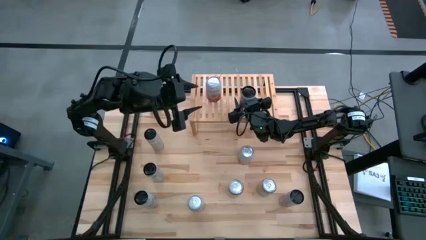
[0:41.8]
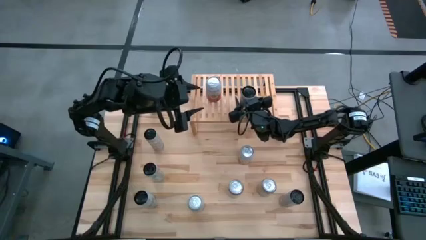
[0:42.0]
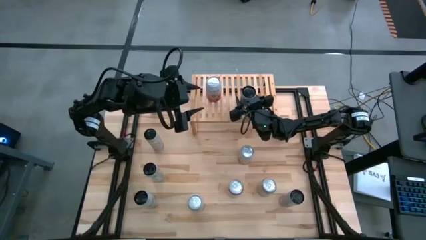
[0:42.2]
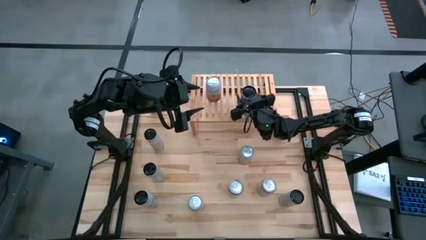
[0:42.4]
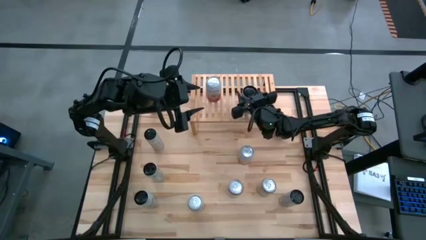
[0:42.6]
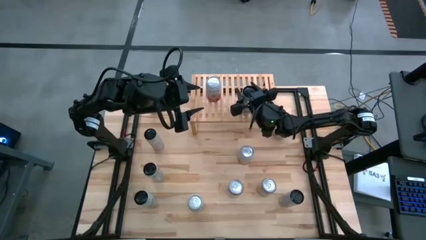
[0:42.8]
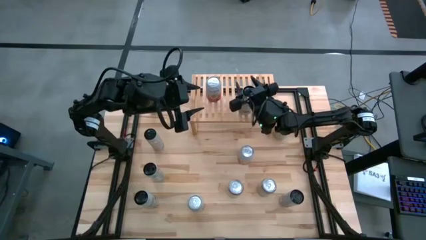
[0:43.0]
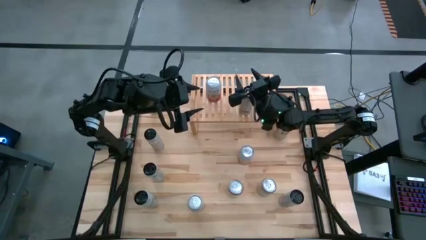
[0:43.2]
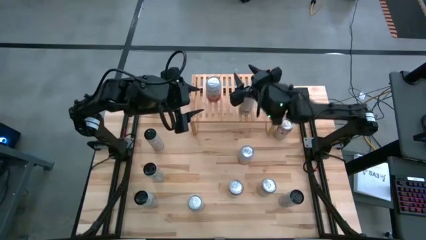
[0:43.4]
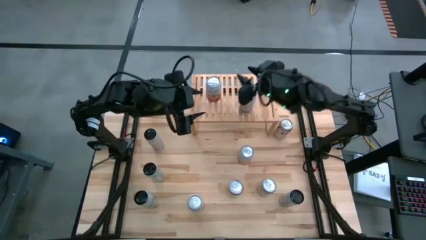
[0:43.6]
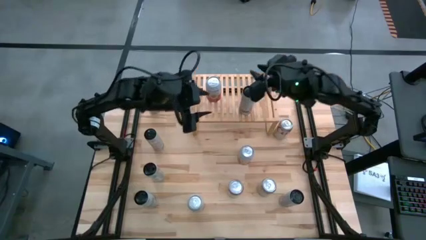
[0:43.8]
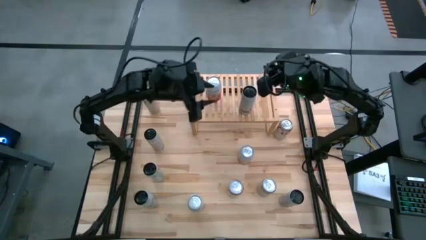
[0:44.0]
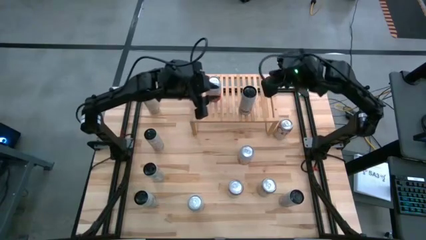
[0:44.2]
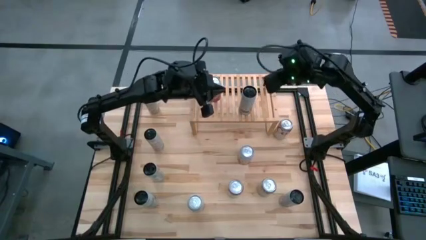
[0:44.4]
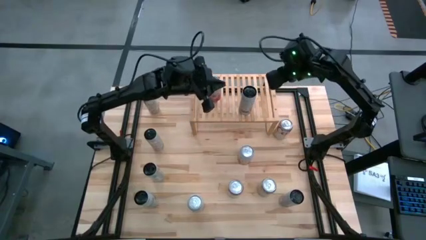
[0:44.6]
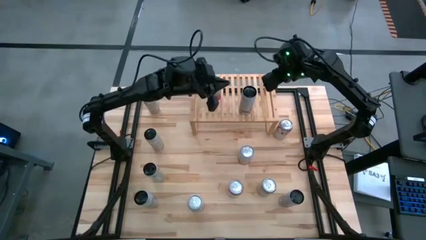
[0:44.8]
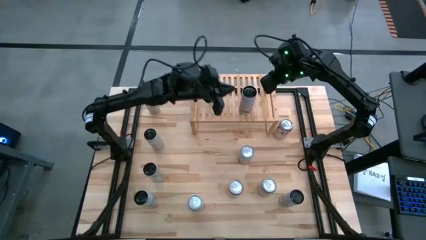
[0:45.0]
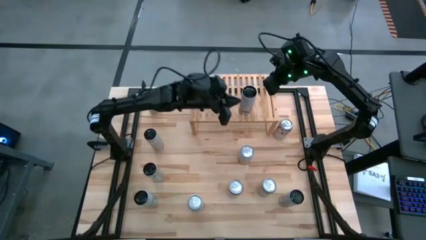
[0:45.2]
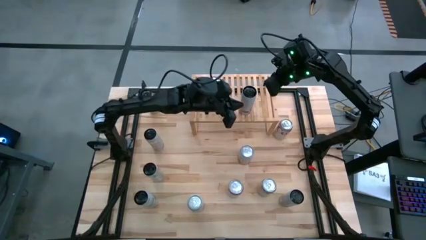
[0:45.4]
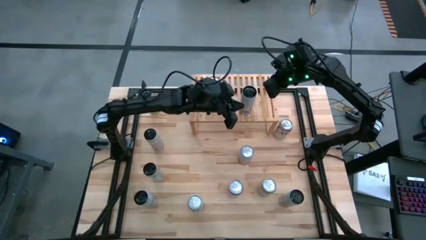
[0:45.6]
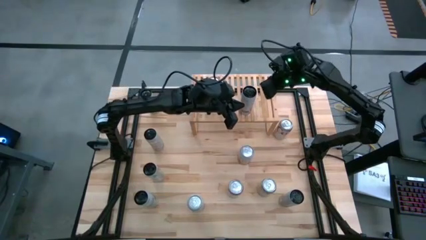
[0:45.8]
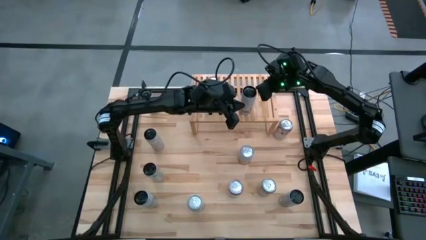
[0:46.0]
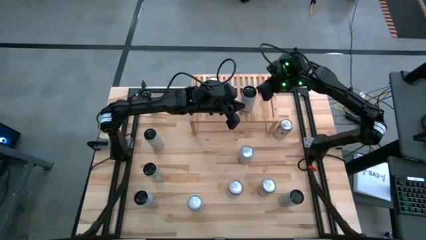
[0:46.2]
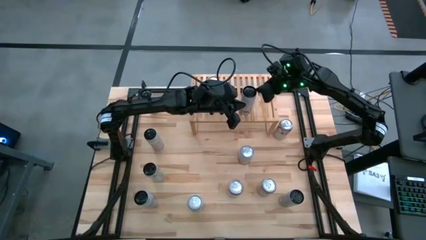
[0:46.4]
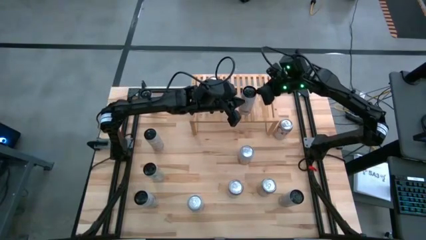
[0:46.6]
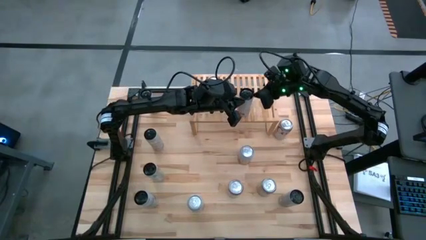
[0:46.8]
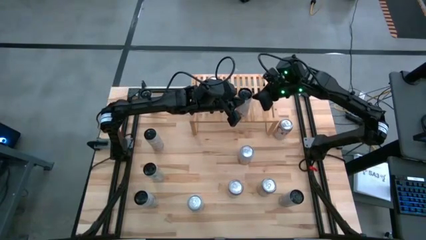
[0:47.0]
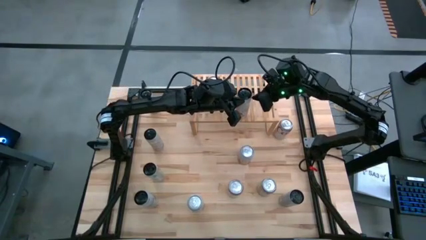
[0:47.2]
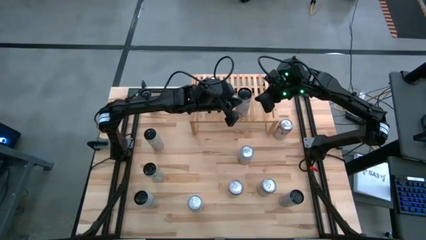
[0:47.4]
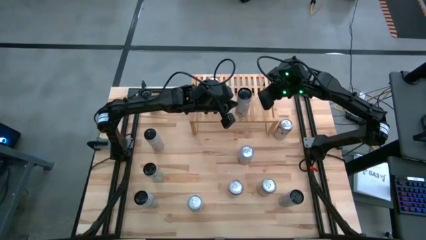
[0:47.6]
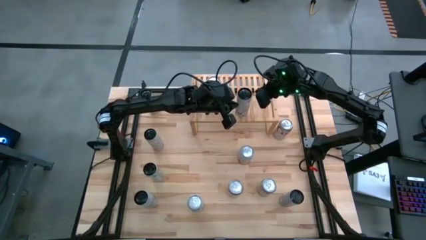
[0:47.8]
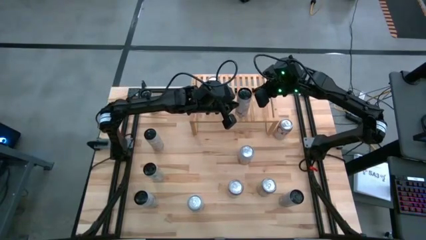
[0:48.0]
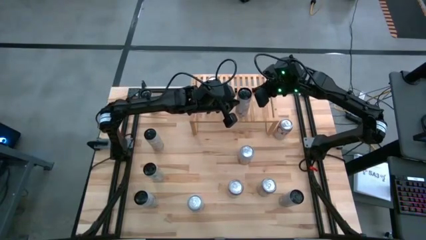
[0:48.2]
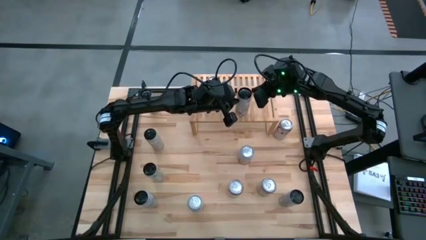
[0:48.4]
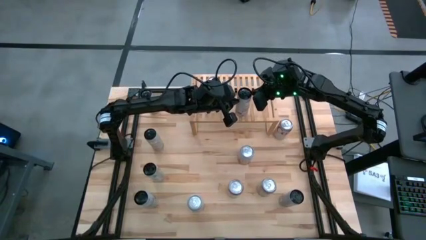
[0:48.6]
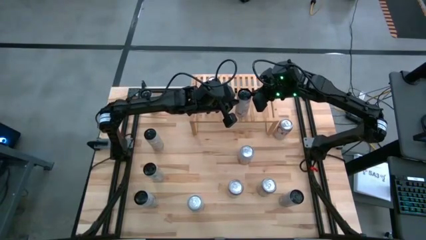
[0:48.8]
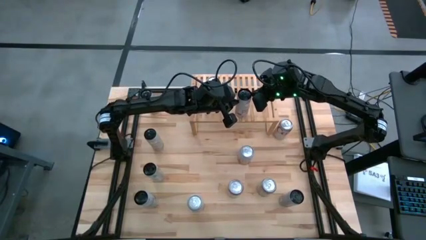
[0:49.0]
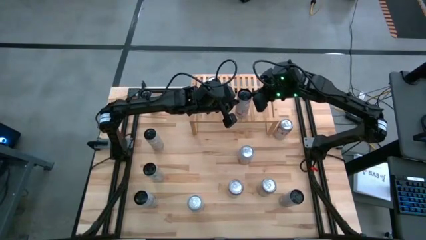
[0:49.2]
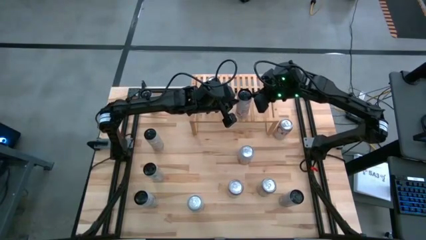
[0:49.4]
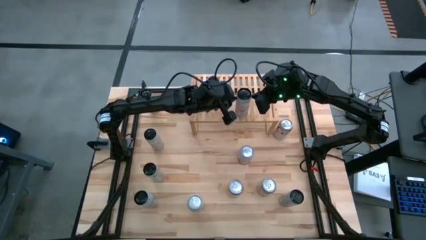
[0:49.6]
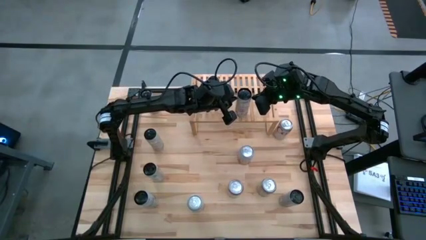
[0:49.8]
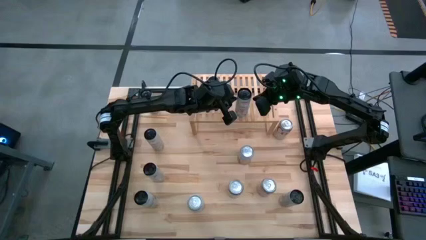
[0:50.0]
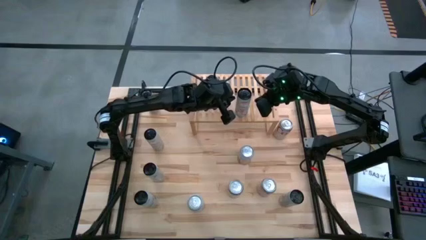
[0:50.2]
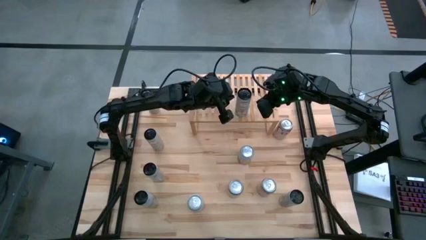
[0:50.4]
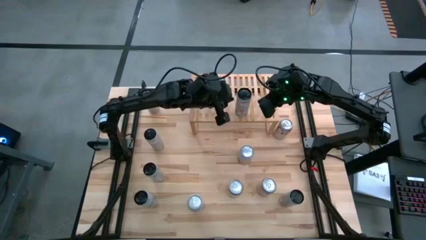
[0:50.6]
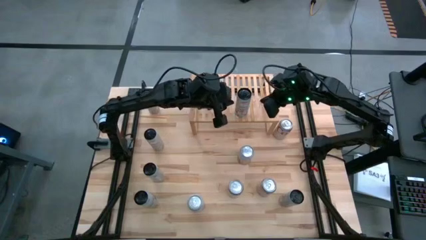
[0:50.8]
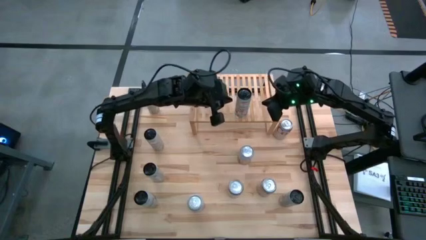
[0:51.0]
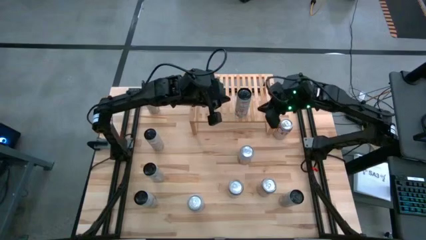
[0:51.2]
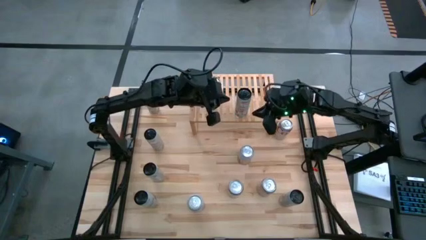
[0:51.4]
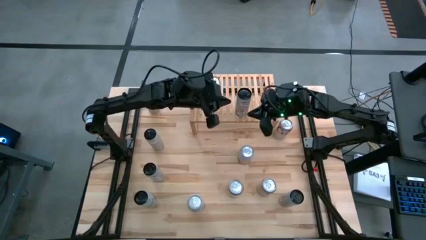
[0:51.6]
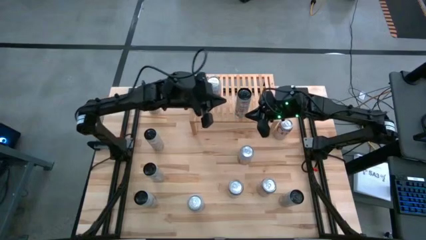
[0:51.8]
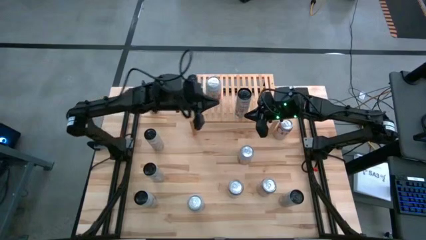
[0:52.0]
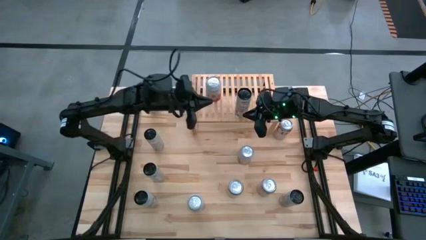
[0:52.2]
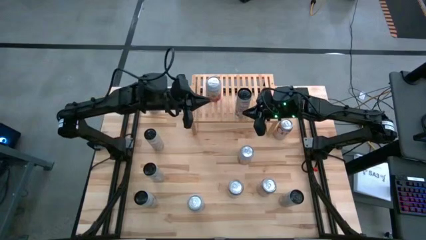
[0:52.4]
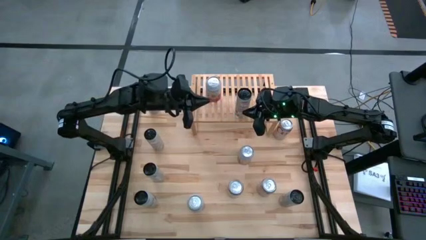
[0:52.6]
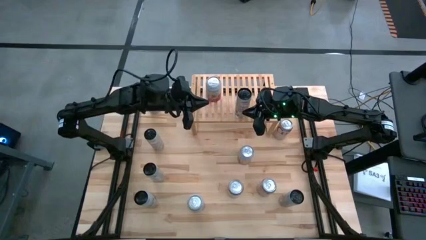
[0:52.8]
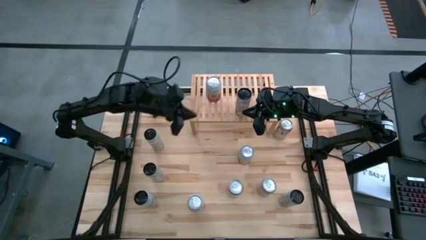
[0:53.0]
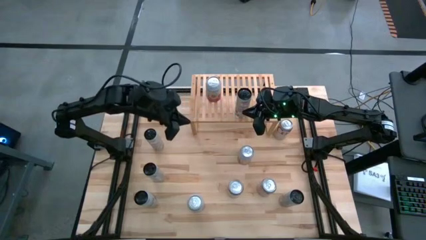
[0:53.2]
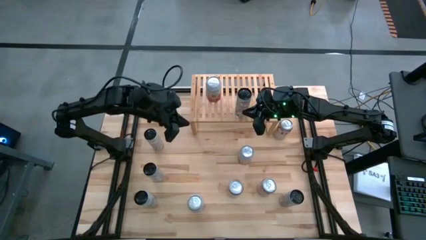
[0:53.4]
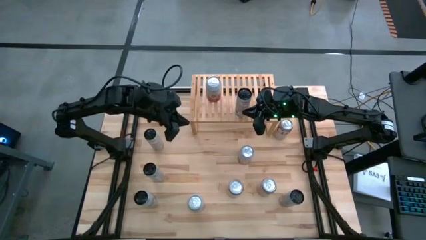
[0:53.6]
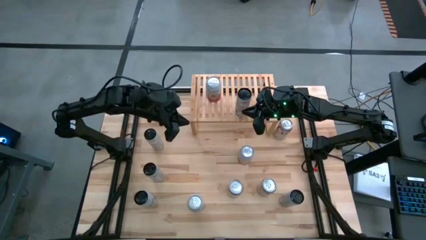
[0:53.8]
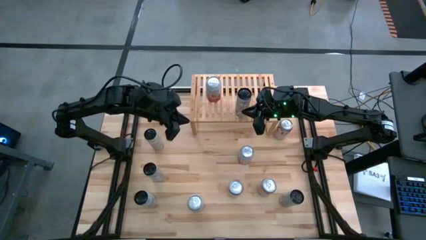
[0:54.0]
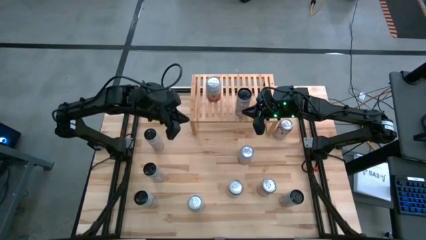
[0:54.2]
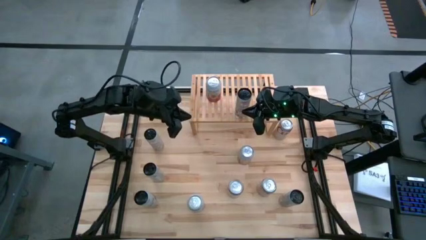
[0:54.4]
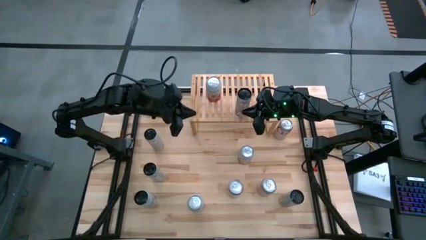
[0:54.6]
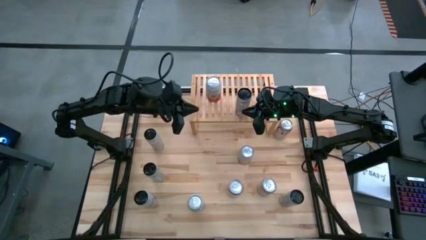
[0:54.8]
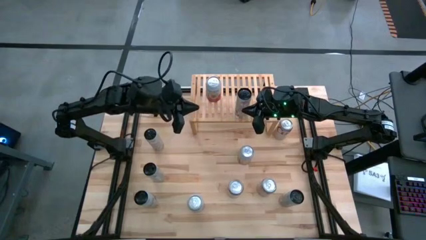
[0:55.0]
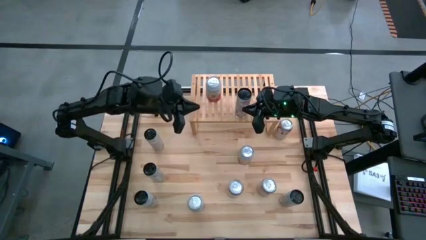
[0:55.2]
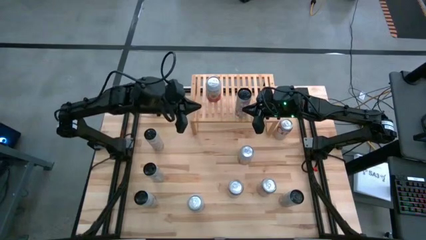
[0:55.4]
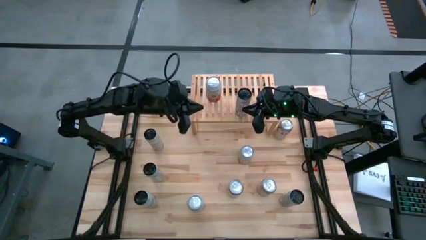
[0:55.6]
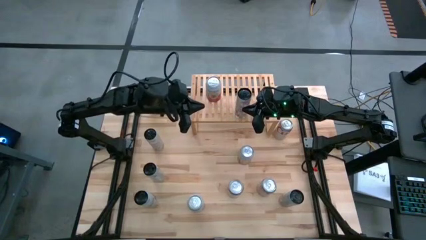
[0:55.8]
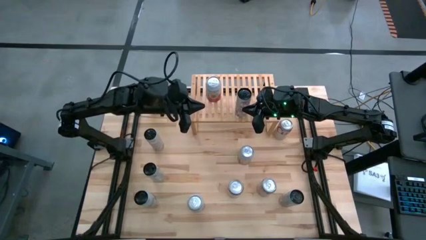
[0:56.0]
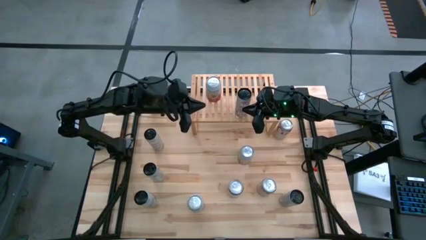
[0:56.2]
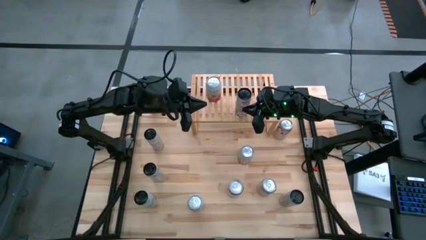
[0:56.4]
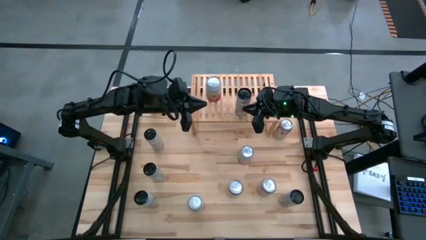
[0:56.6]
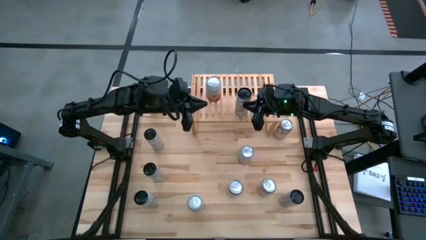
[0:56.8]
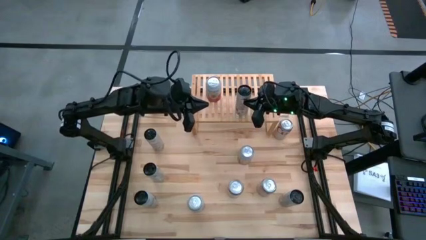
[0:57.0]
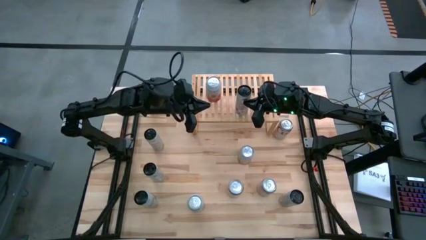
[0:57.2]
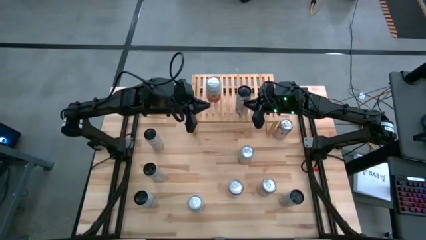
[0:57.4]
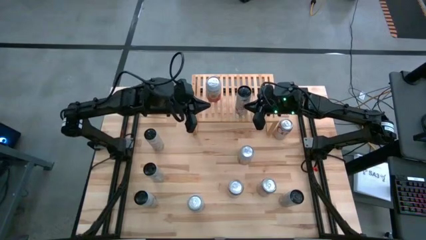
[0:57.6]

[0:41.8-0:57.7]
Task: Place canned beverage on shelf
Put the center white soda can on the shelf

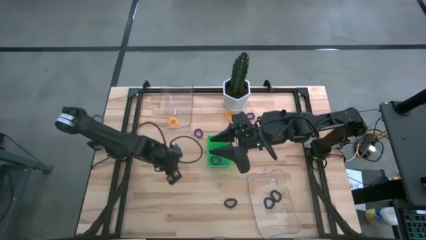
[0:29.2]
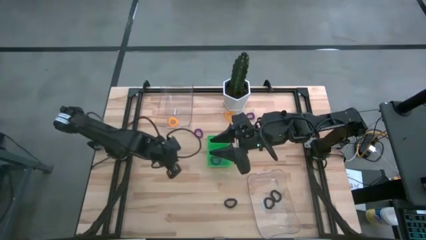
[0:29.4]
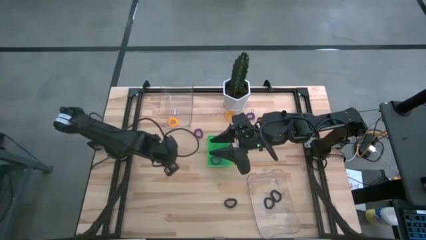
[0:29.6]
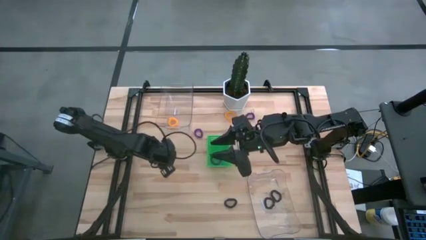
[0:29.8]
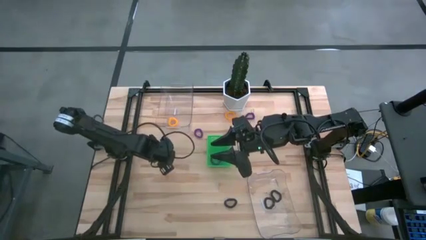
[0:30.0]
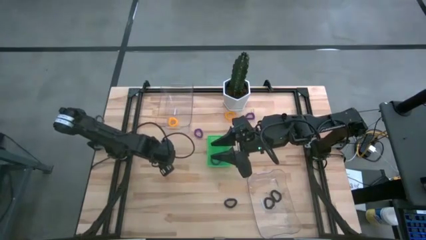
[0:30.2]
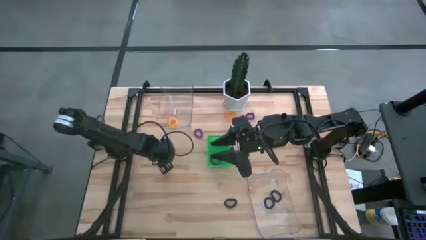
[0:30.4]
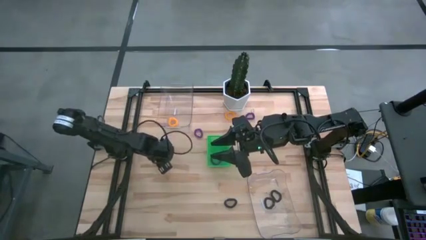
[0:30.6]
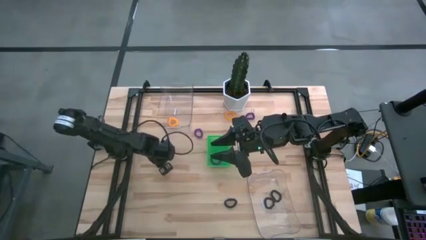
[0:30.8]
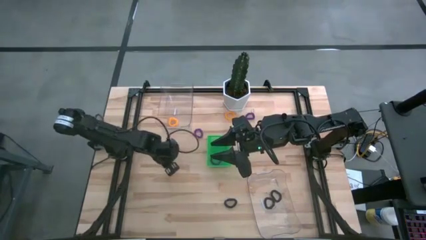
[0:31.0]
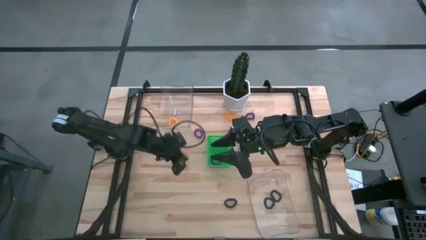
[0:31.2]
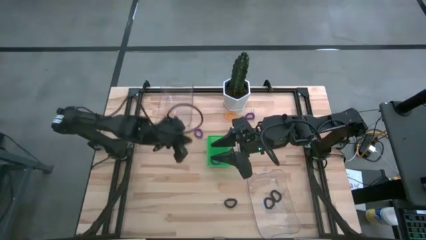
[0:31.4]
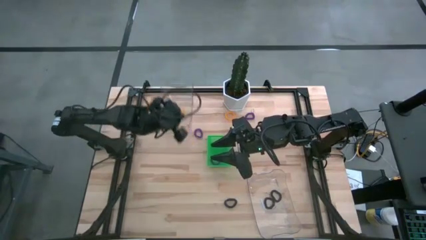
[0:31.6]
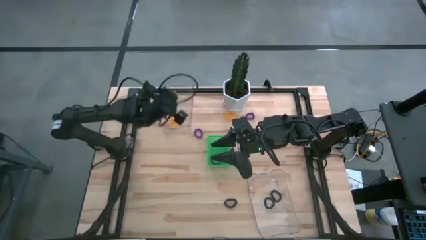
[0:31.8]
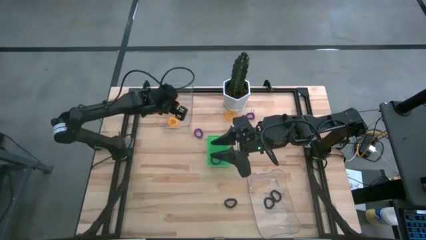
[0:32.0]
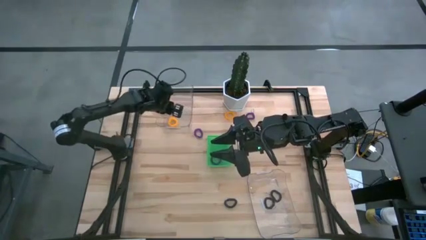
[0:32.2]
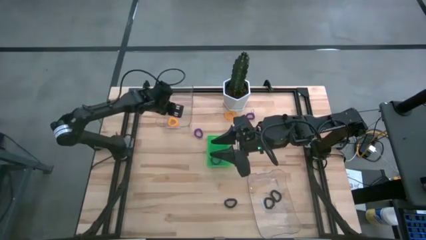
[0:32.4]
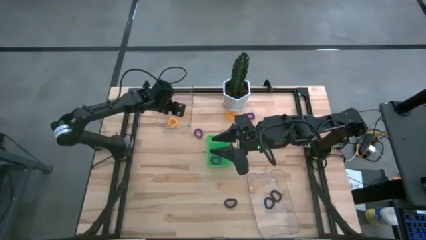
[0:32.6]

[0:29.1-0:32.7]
Task: Sort spring keychains
Put the left yellow spring keychain into the top transparent bin
